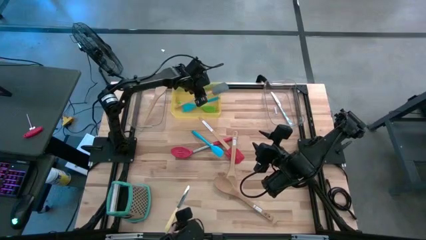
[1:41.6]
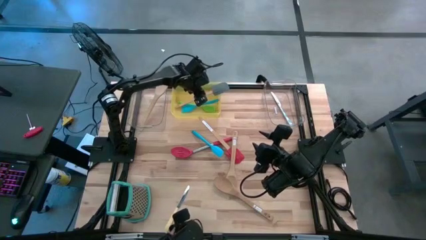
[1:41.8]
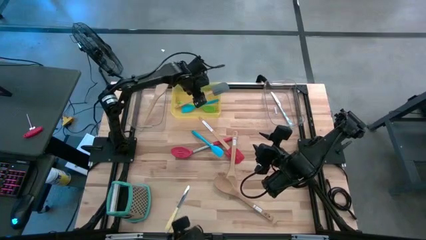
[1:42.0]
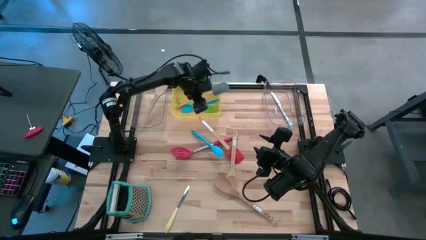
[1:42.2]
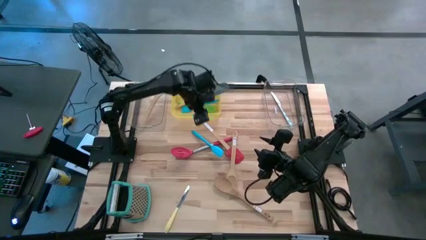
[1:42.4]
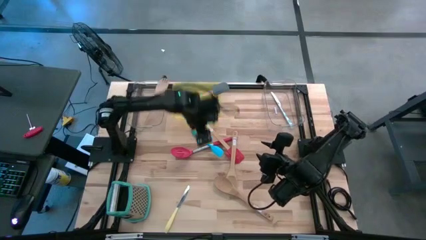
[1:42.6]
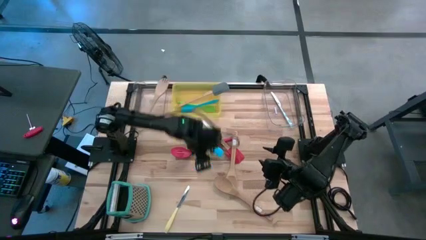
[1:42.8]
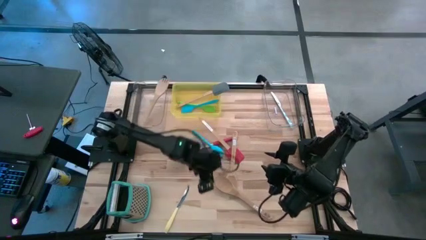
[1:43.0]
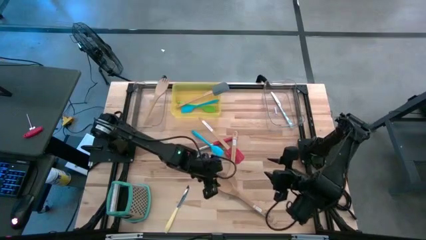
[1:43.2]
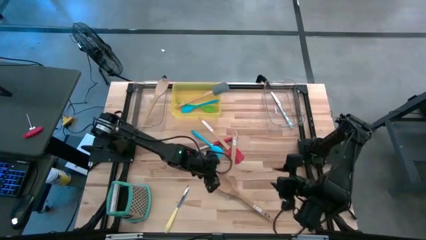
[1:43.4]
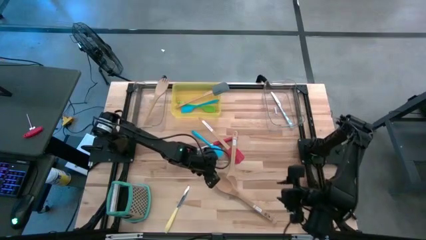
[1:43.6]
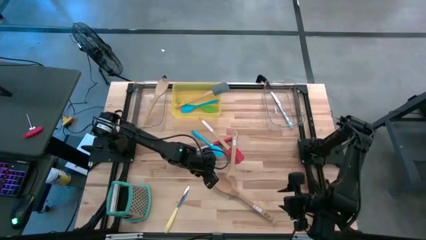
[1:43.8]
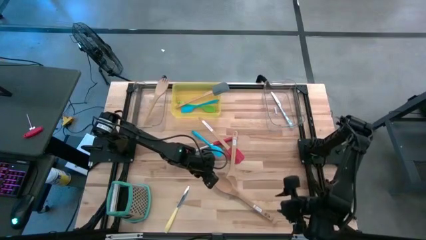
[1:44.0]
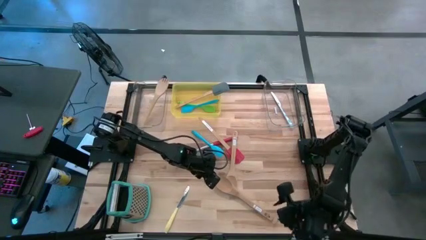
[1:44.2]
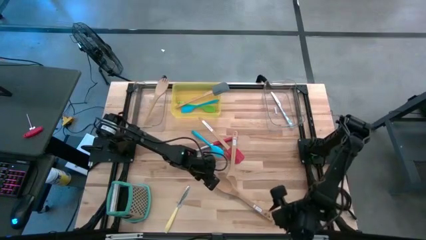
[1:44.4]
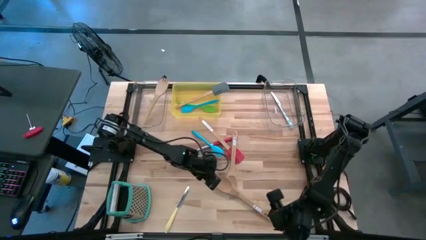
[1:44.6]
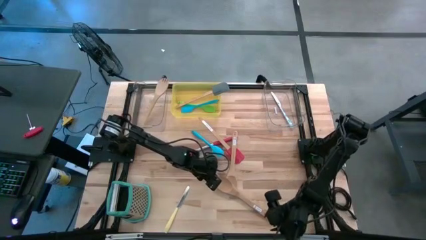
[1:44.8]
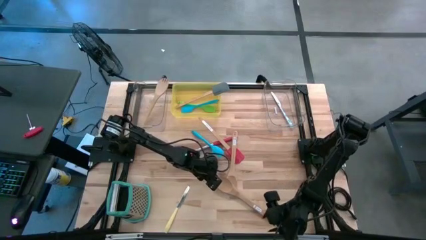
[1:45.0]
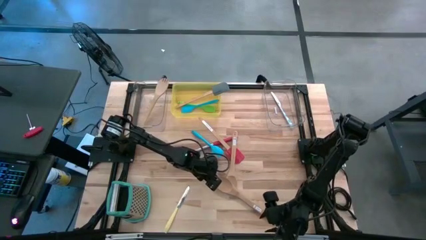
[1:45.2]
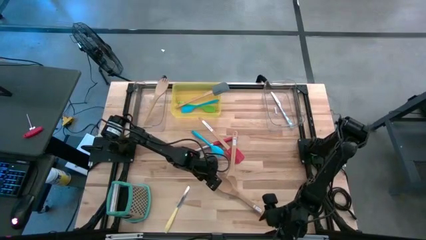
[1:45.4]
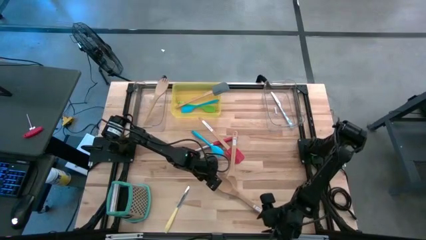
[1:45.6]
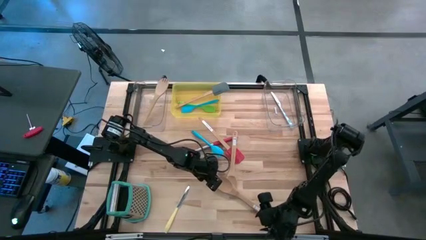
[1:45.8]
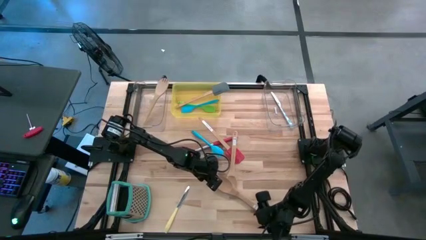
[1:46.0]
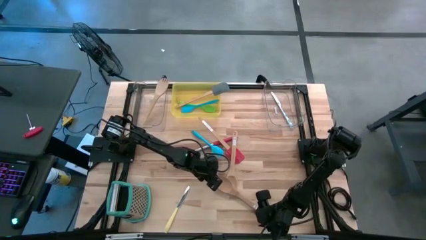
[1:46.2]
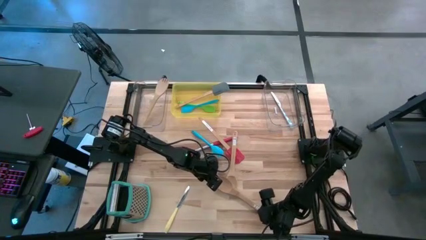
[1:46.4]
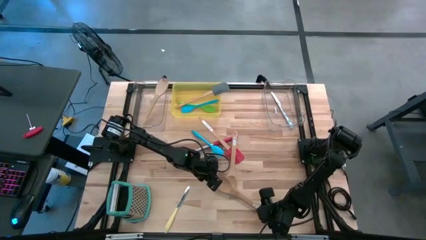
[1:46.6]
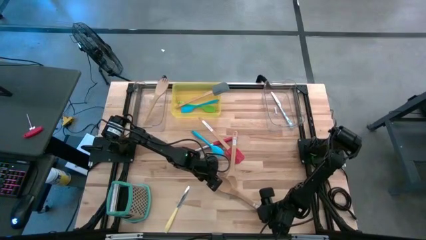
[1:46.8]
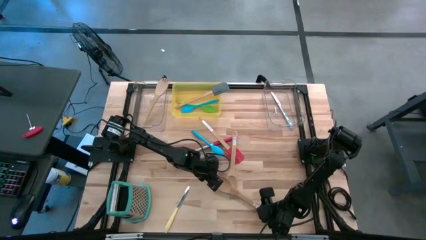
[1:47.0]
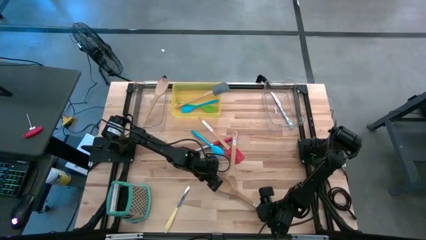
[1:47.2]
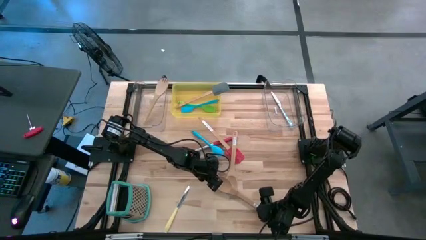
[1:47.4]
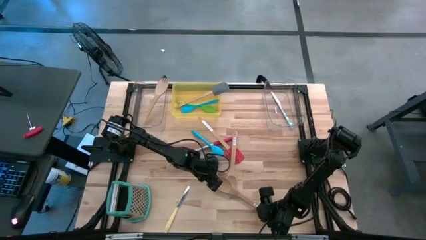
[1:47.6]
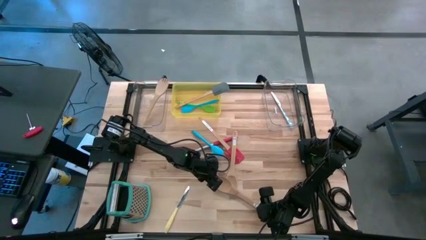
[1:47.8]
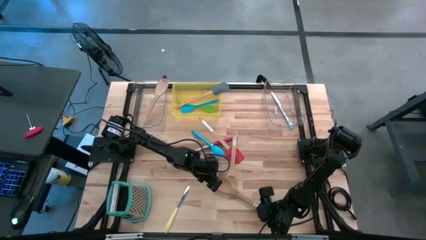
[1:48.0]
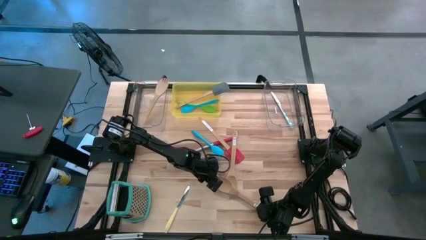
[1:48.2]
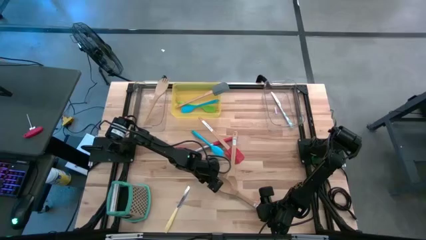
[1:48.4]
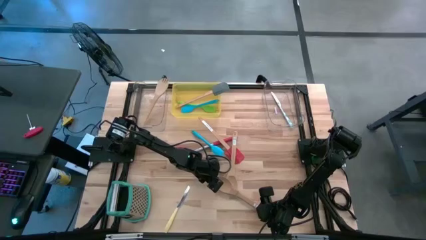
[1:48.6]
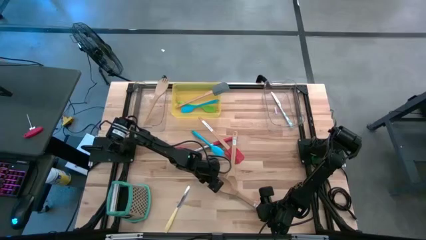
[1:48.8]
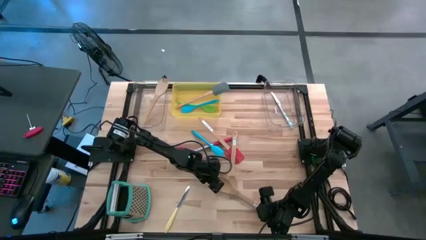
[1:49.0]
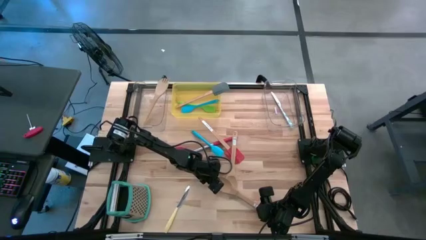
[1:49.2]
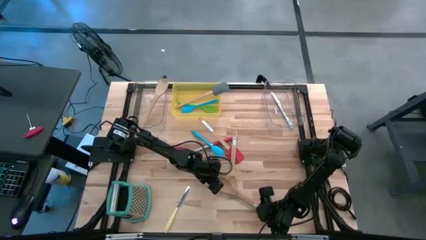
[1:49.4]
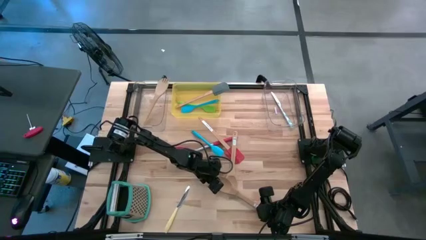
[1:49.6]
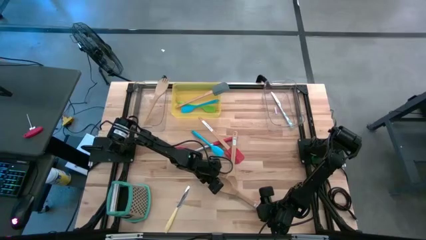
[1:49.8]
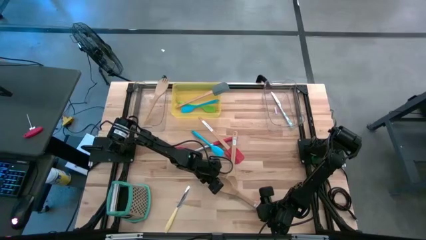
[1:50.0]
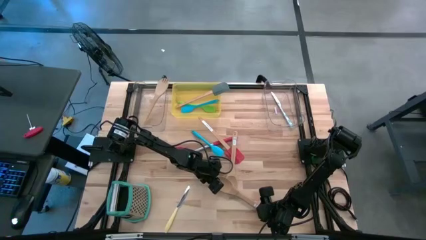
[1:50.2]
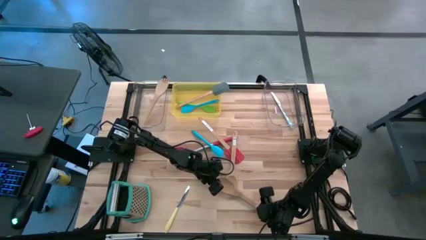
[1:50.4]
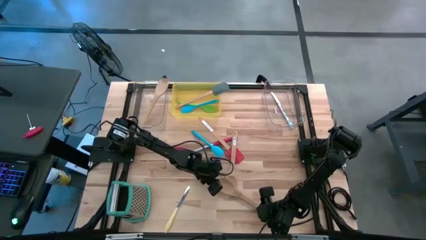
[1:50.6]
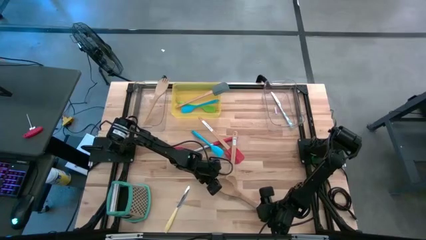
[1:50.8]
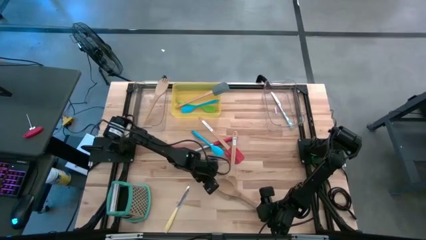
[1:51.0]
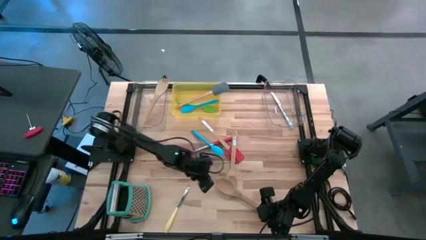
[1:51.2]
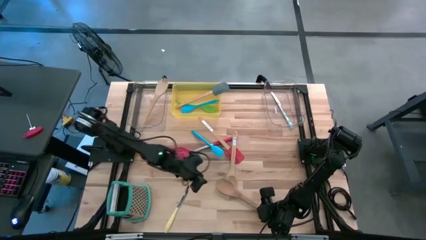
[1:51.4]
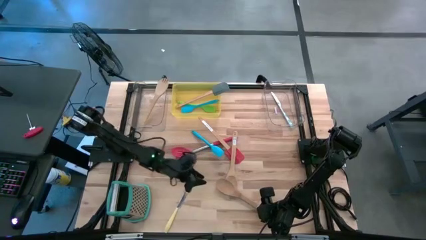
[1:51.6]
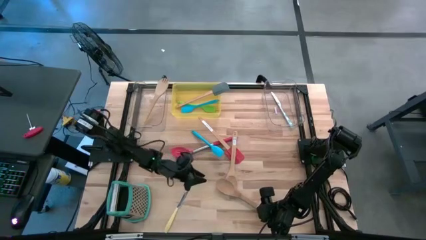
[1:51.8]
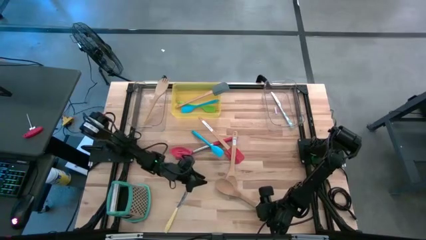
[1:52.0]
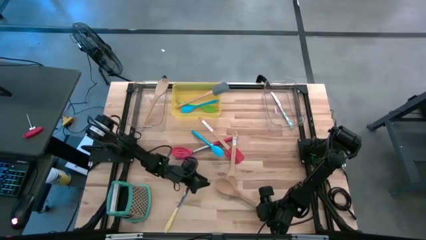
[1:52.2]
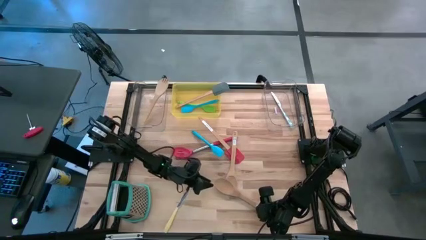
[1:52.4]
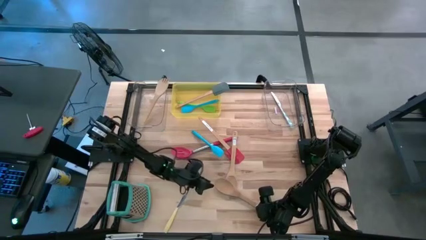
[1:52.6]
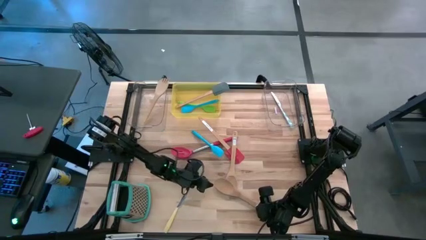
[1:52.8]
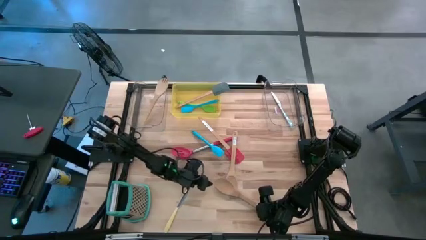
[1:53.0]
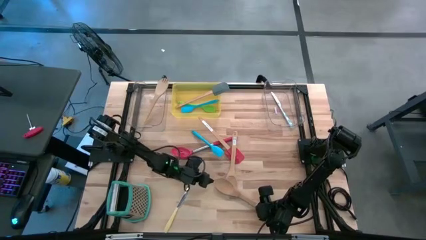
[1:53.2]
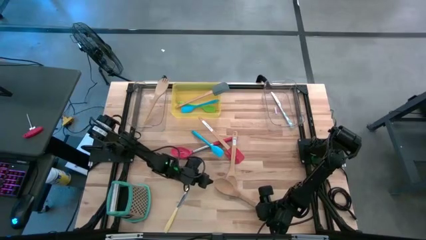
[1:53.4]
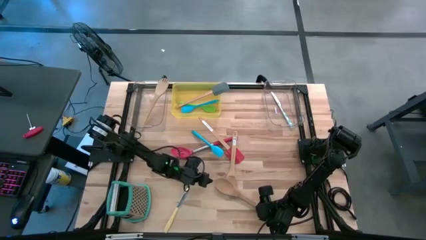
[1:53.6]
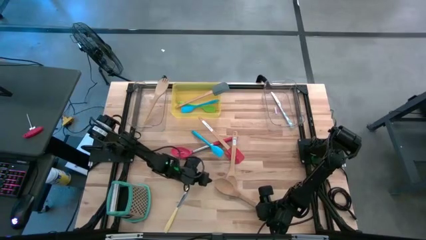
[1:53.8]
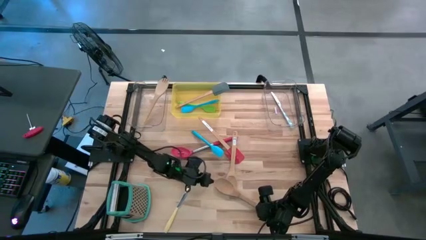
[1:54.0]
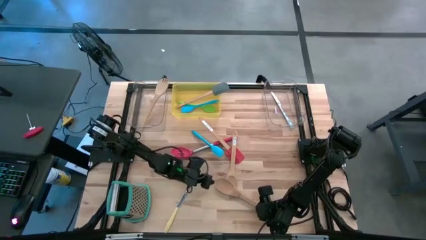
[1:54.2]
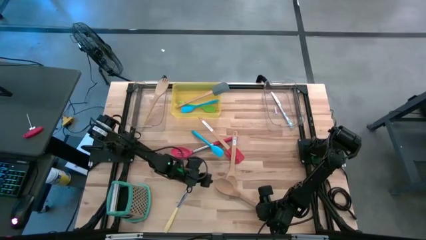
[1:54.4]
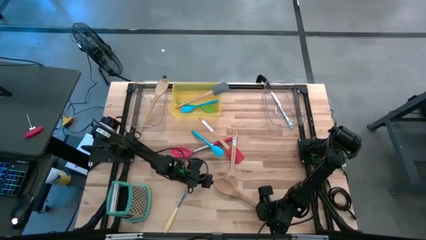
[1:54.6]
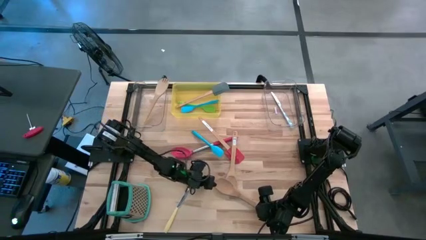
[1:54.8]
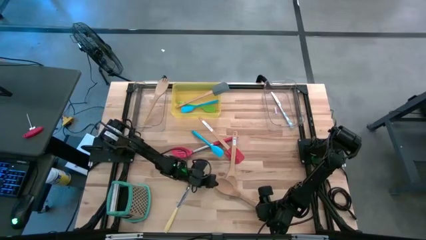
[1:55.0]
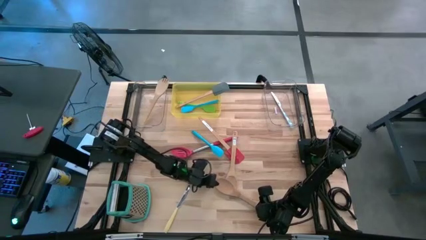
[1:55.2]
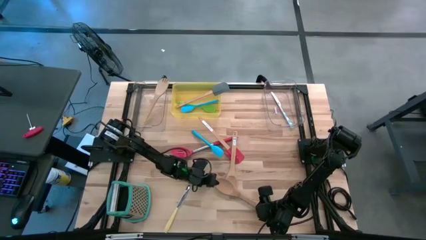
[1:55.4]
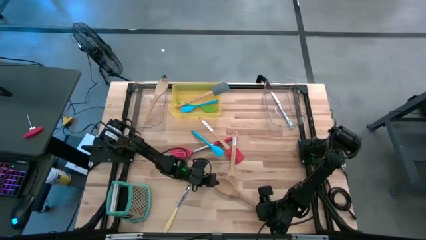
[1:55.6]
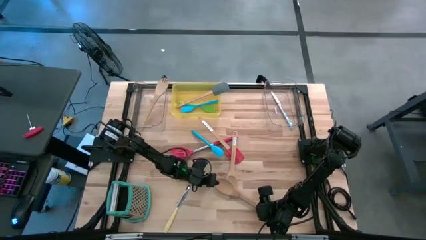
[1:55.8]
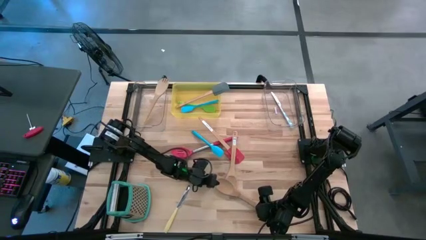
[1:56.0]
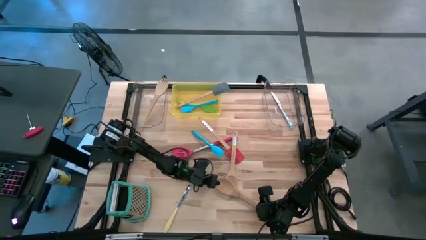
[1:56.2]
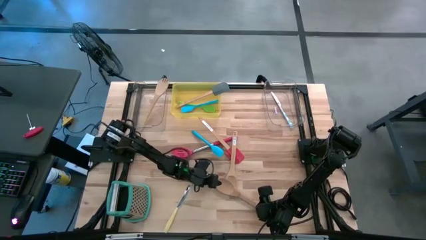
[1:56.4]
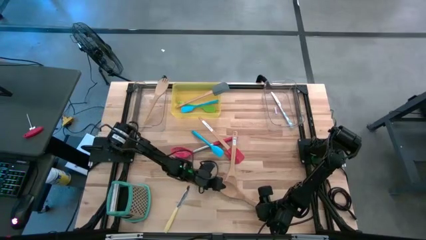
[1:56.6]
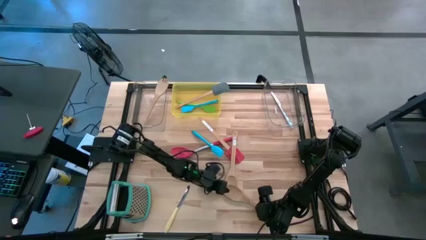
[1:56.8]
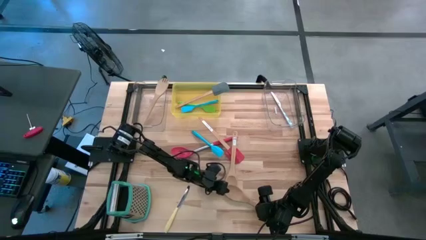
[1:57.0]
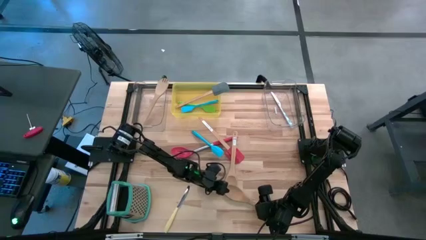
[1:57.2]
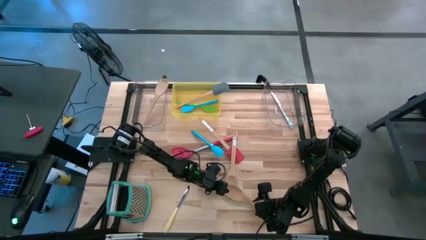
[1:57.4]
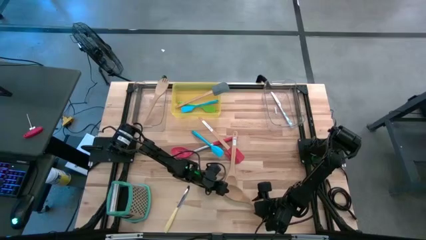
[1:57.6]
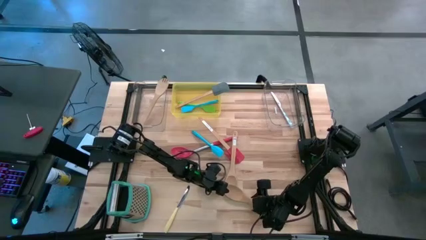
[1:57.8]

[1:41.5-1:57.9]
Task: Pick & Place Kitchen Items
Put the wooden serving spoon into the left transparent bin
